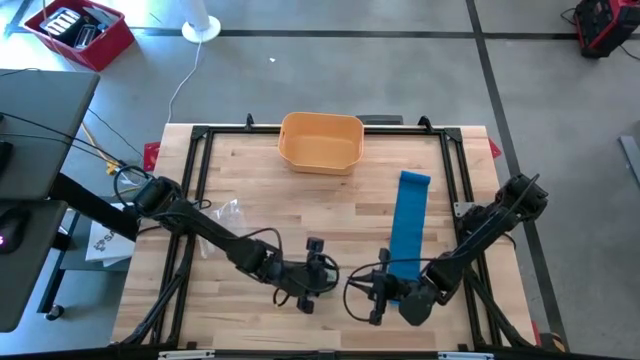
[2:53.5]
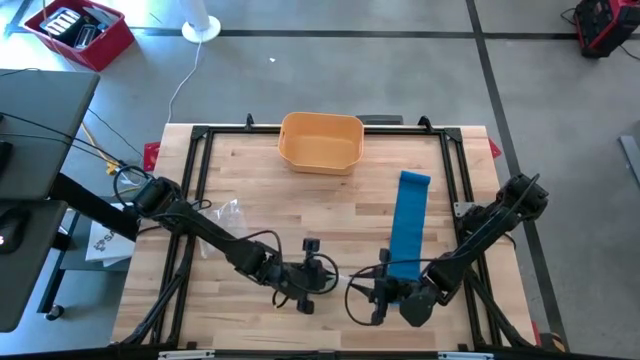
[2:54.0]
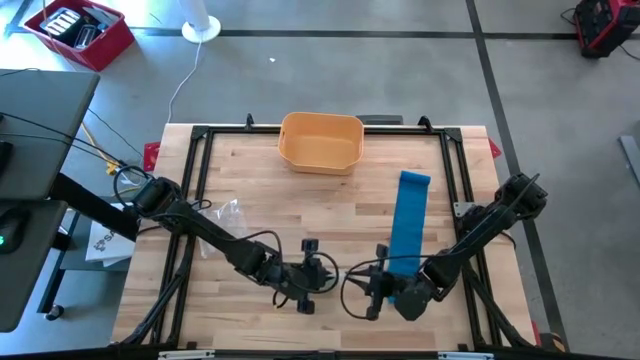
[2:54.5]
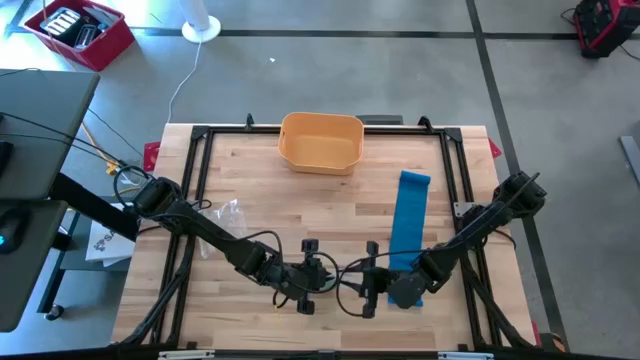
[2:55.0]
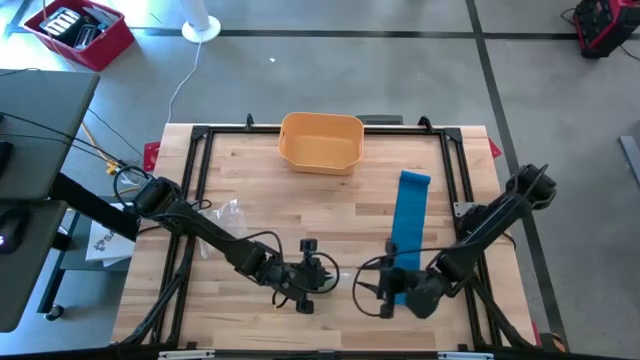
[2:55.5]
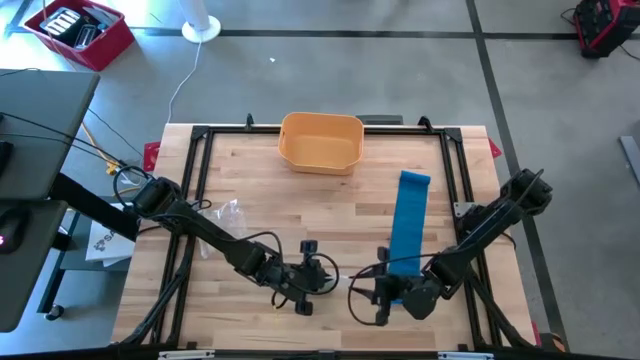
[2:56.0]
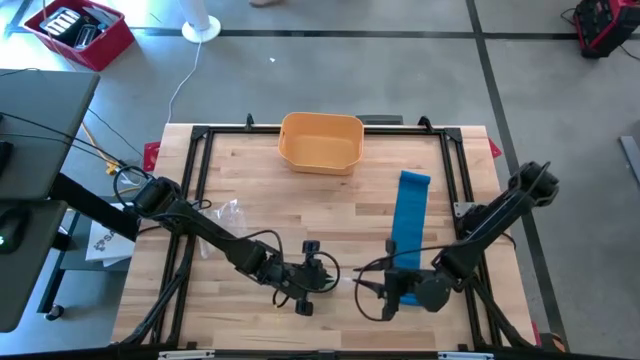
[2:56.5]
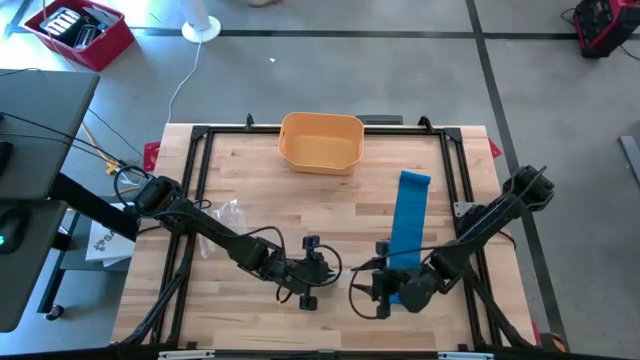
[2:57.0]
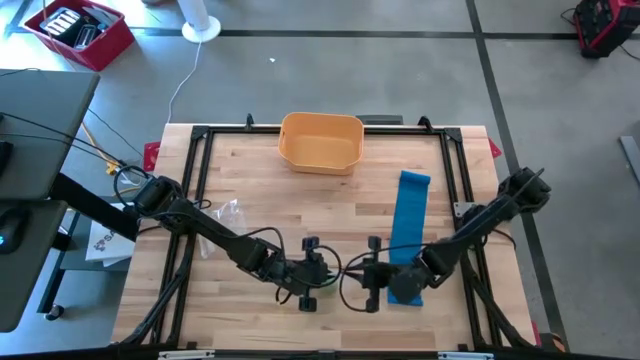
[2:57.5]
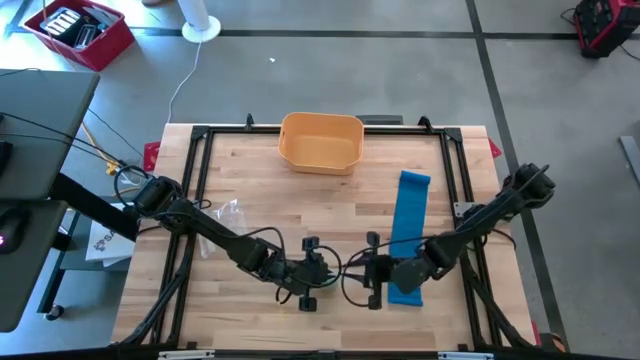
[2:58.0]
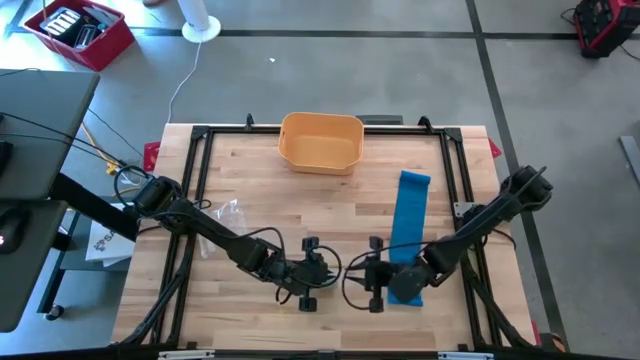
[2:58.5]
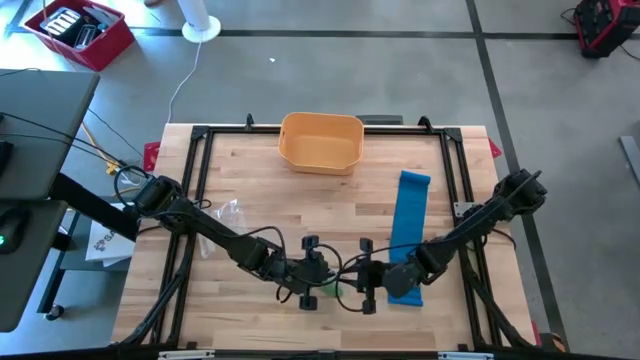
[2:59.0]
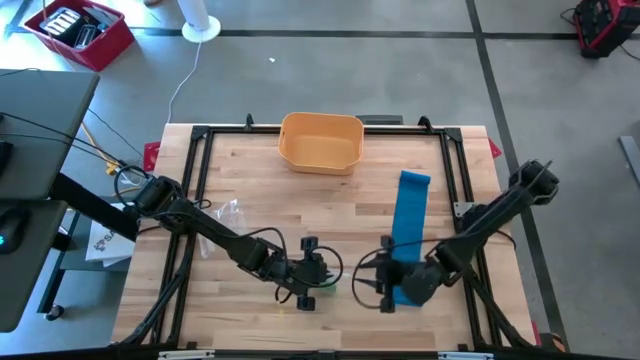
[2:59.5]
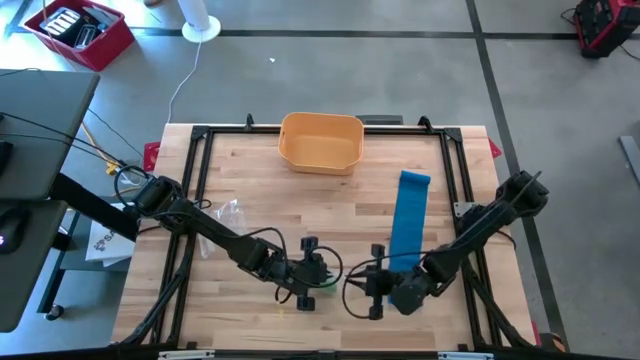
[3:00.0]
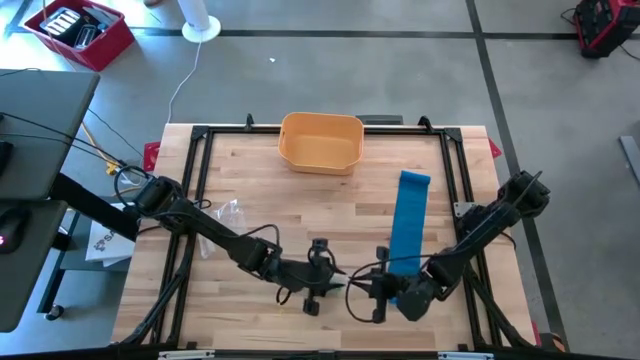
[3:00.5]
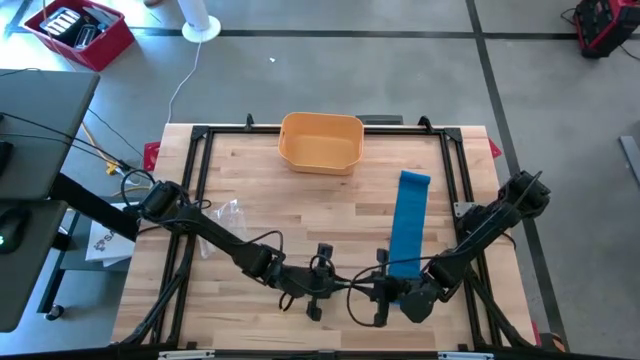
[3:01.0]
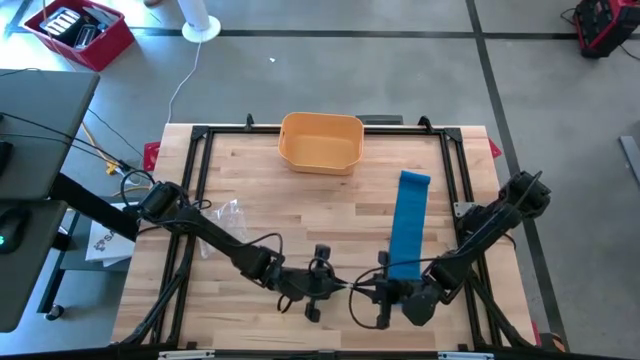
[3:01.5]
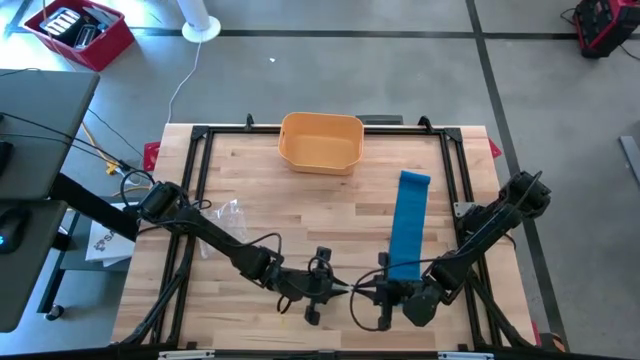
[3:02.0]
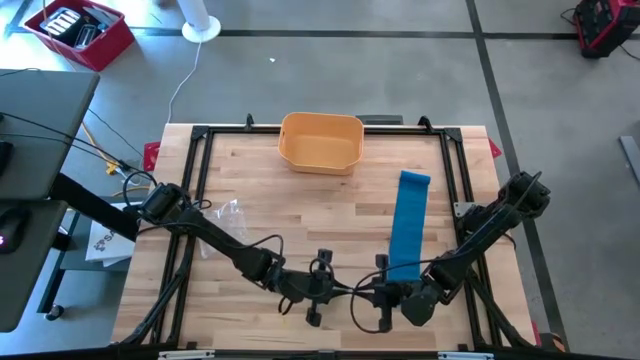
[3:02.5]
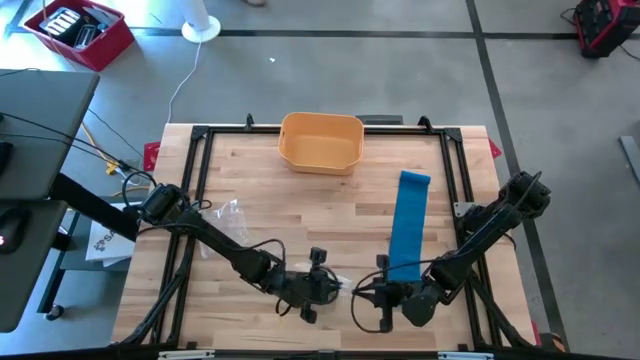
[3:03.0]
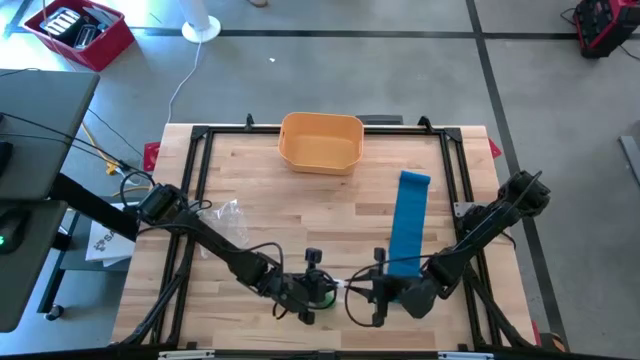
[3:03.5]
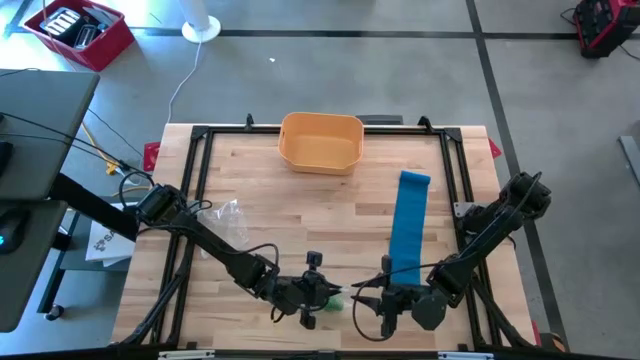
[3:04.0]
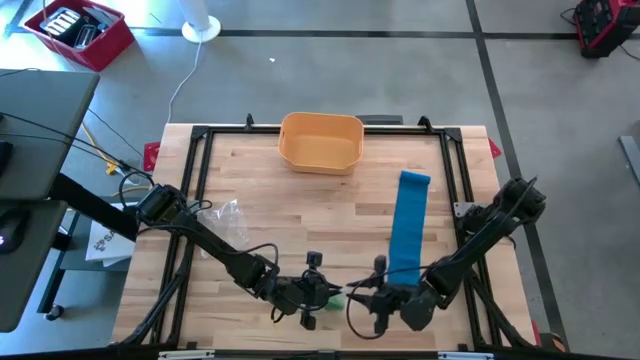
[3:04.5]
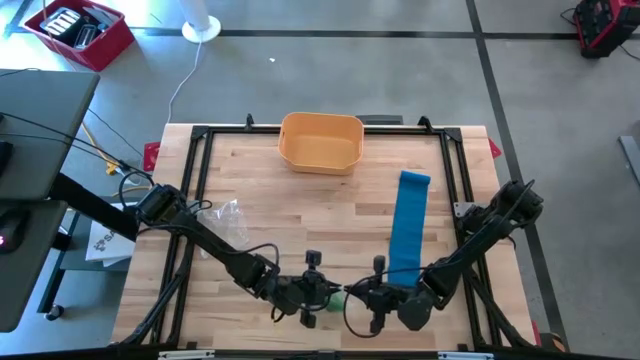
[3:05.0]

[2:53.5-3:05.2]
Task: Roll bandage
Close the transparent zip bag

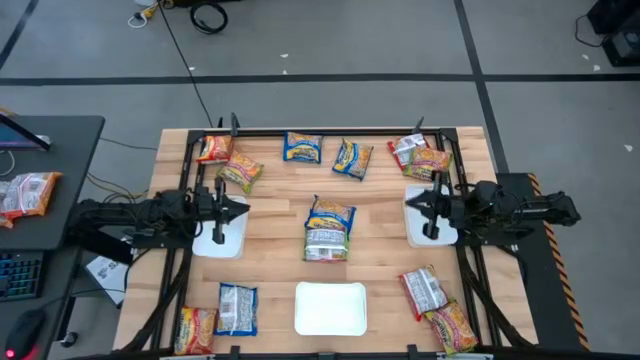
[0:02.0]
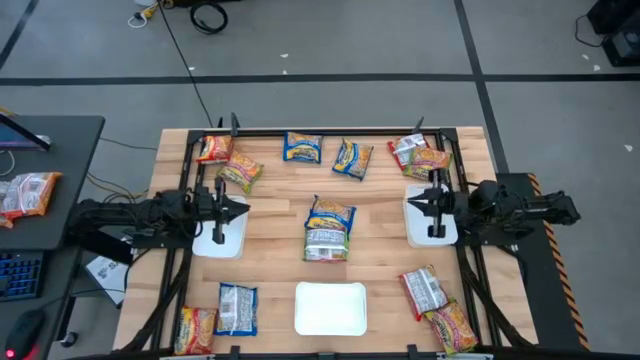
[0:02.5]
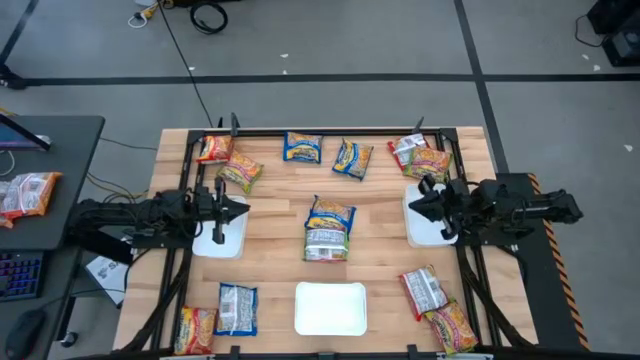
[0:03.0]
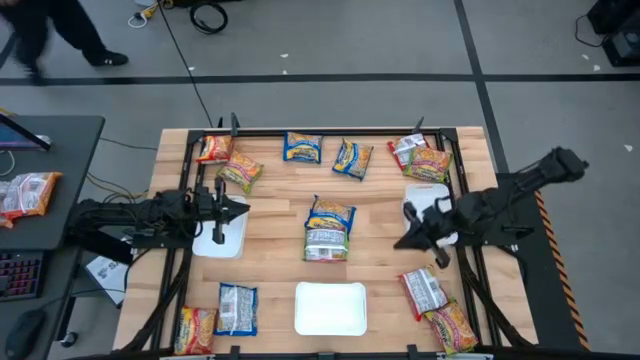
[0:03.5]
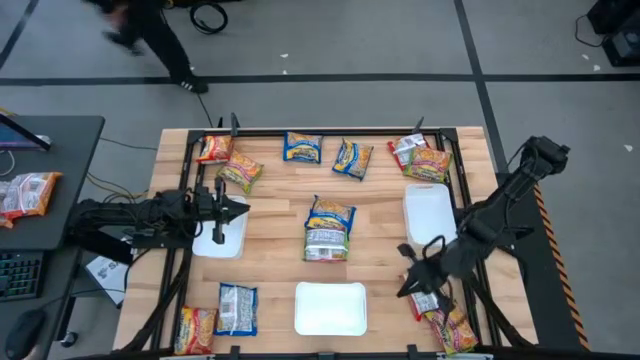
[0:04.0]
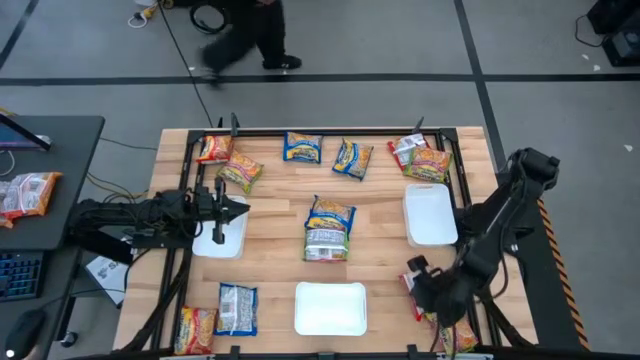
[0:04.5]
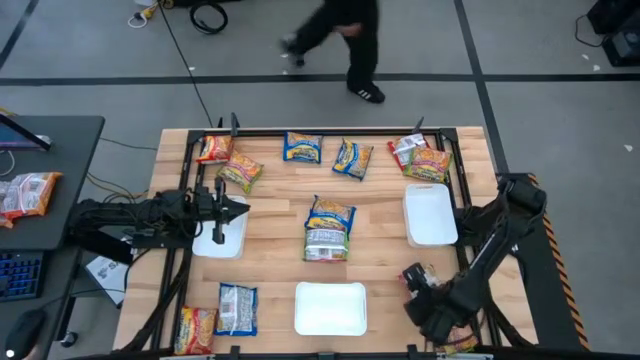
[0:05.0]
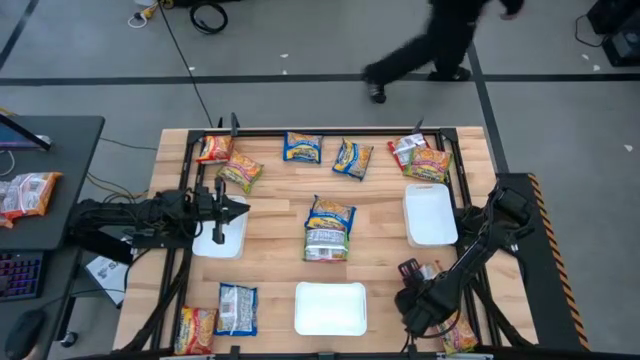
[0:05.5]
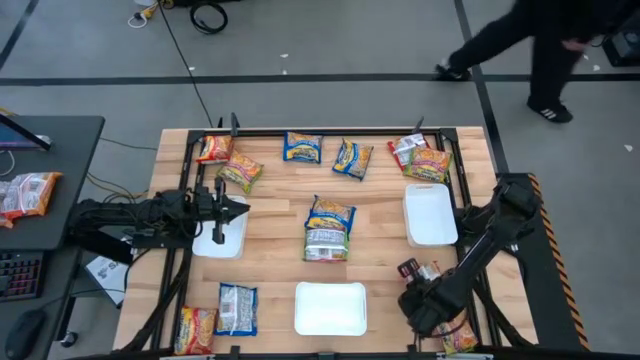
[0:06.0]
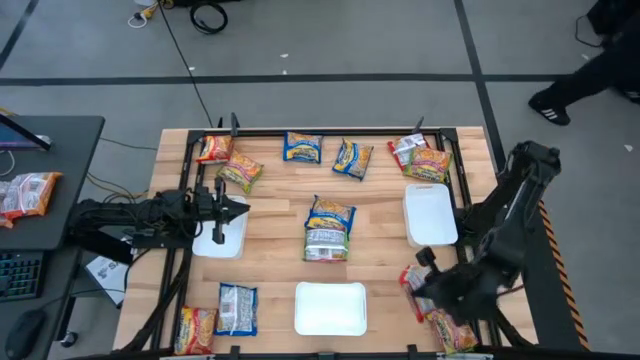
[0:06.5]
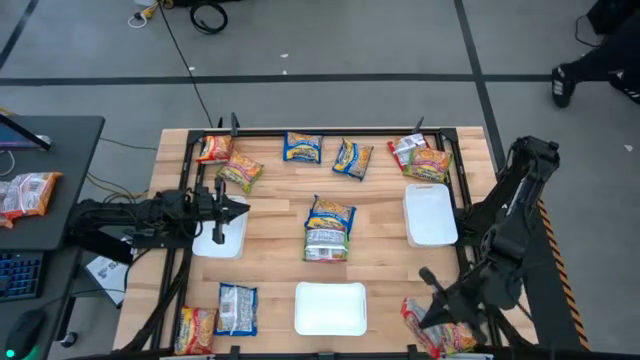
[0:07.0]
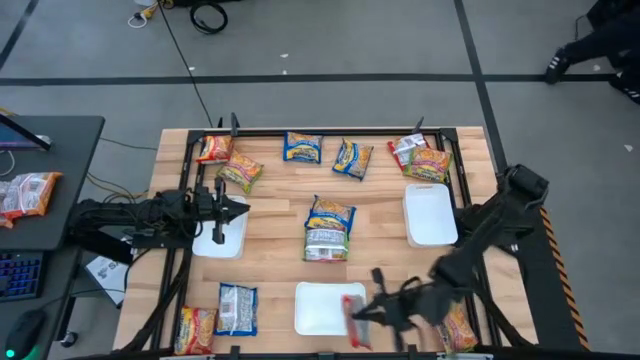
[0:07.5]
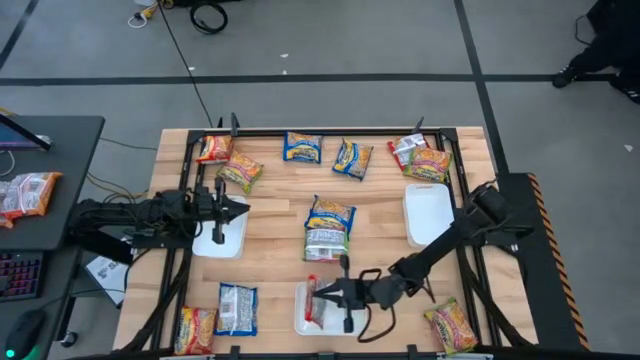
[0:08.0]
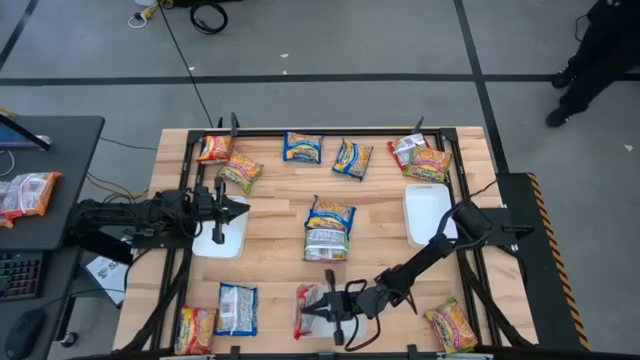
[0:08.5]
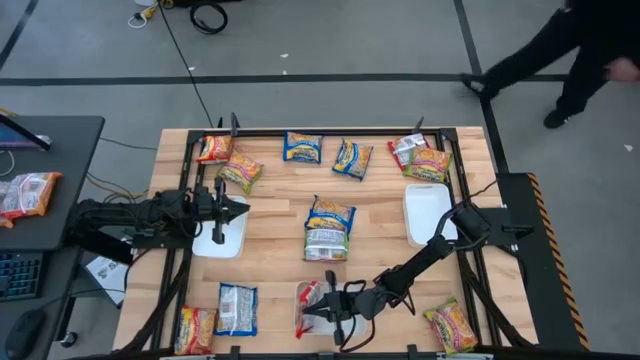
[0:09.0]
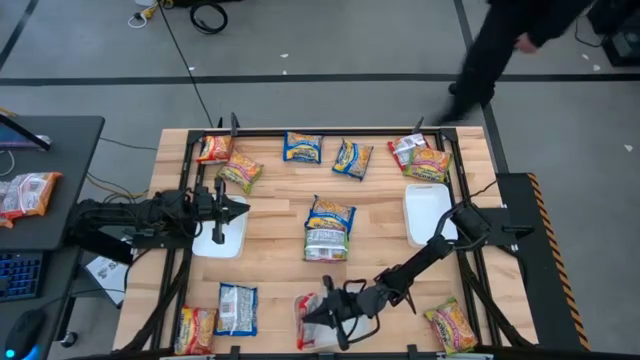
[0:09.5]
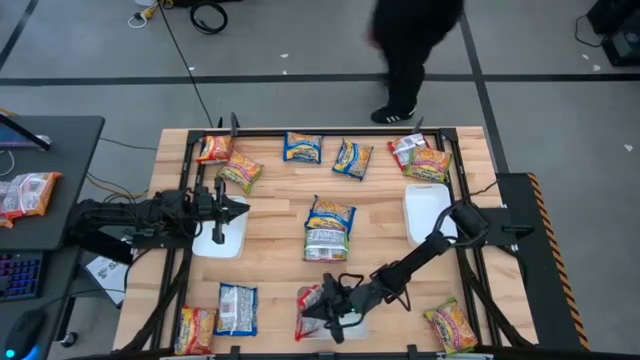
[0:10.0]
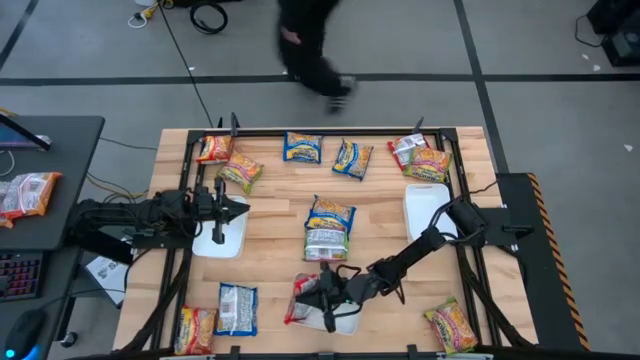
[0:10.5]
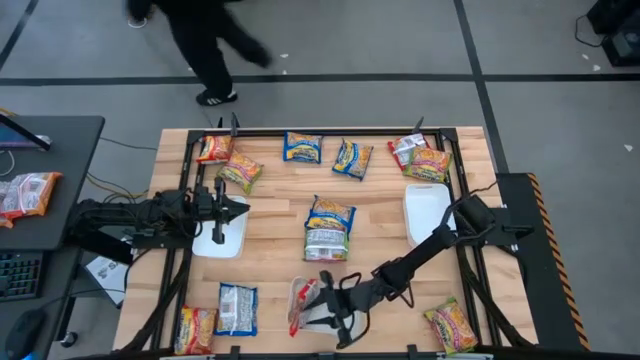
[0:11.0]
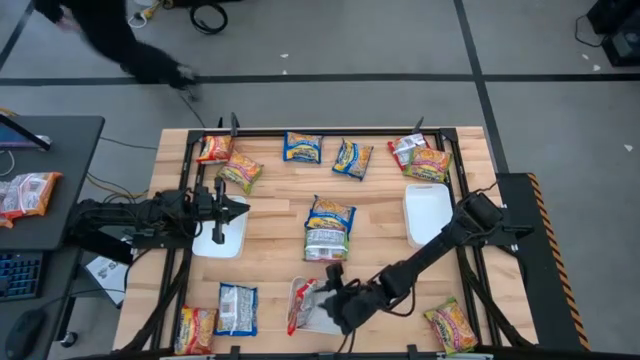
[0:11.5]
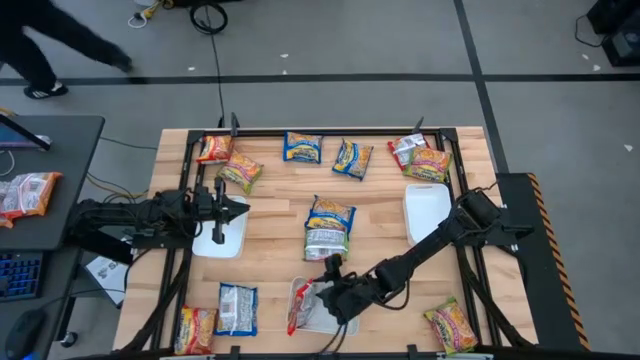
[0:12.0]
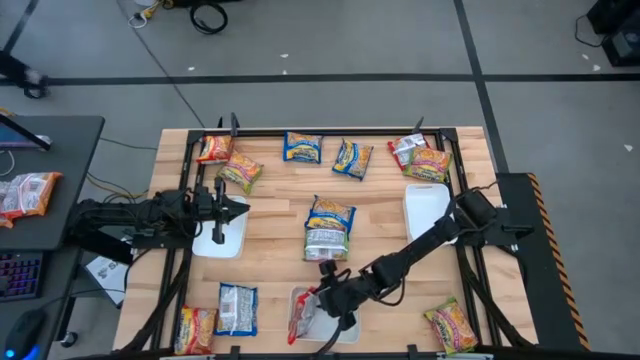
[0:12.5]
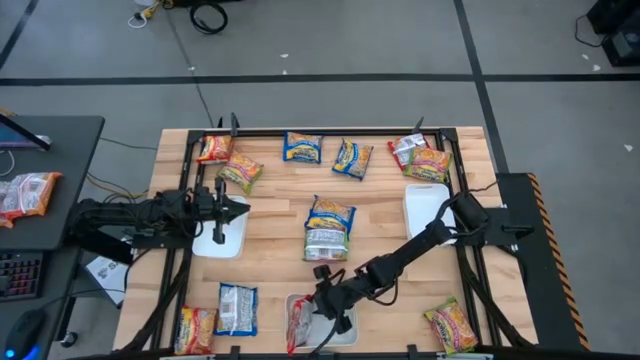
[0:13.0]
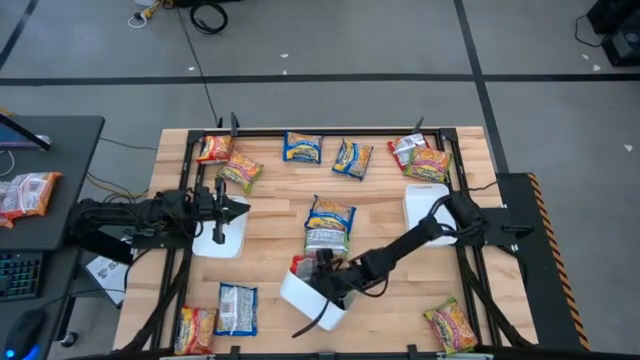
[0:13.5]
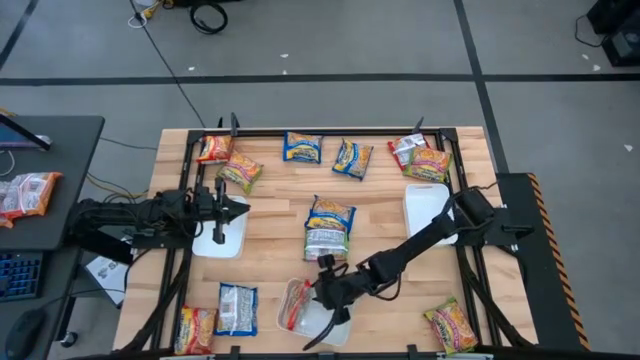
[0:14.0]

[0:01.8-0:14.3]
Task: Sort Maruchan noodles
Put the bottom right red noodle pack into the bottom white bin
